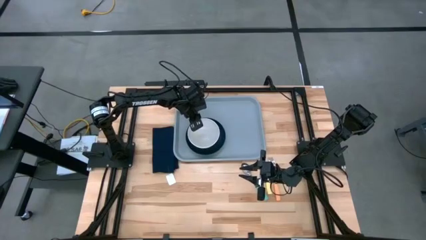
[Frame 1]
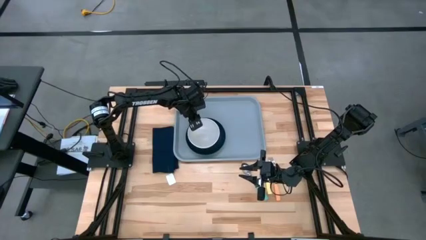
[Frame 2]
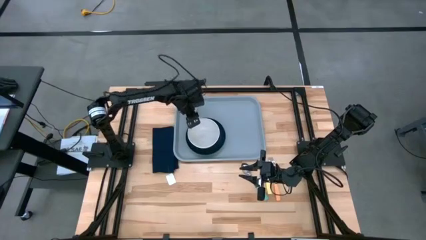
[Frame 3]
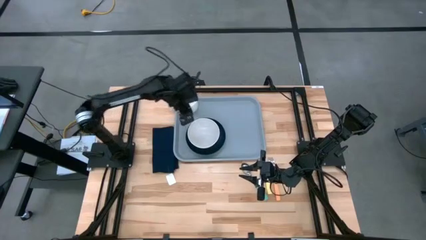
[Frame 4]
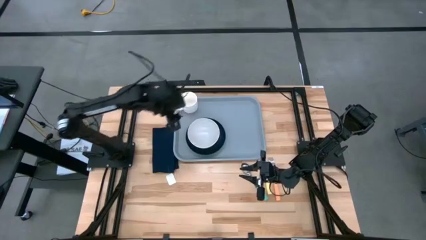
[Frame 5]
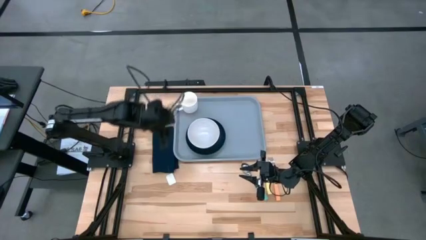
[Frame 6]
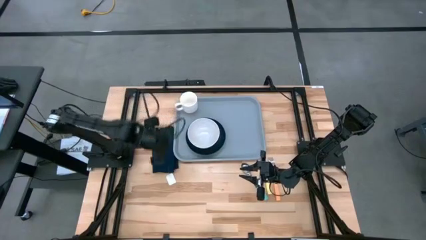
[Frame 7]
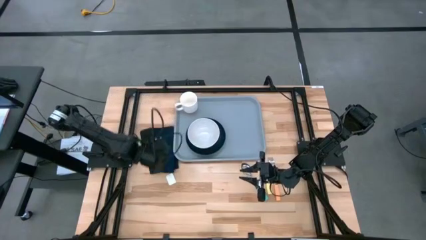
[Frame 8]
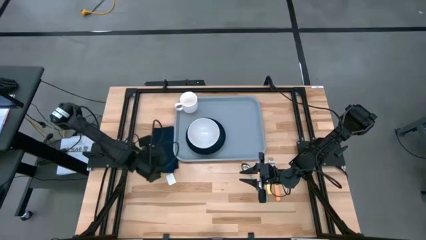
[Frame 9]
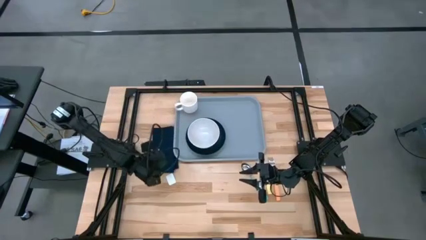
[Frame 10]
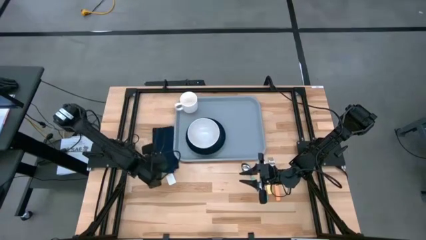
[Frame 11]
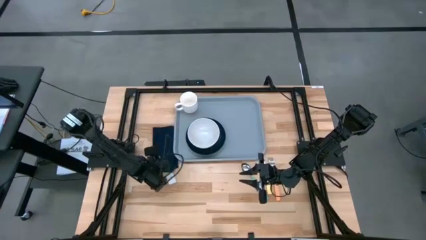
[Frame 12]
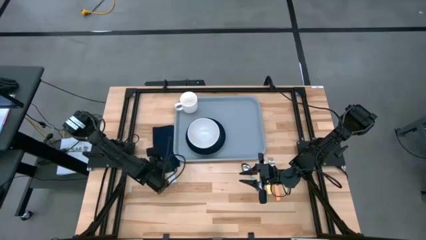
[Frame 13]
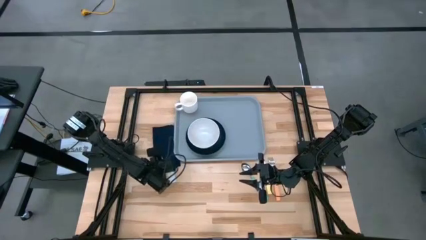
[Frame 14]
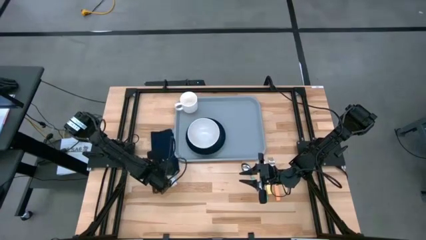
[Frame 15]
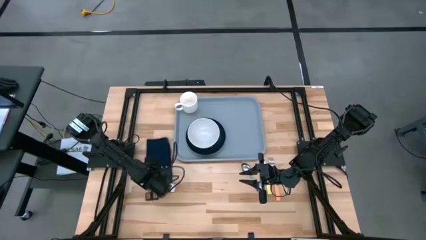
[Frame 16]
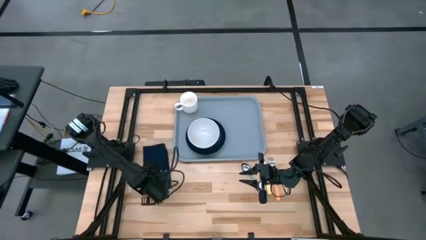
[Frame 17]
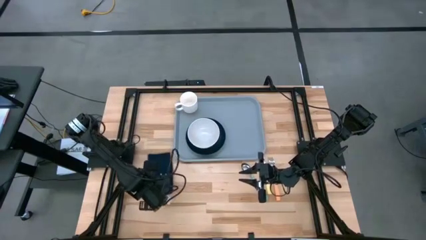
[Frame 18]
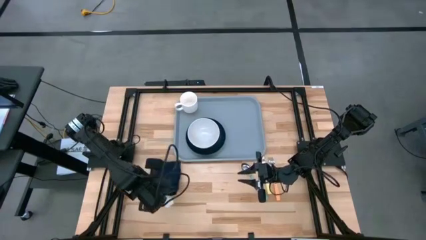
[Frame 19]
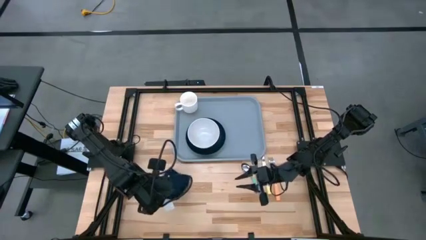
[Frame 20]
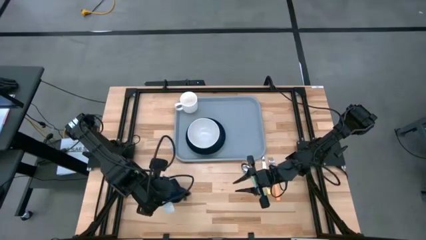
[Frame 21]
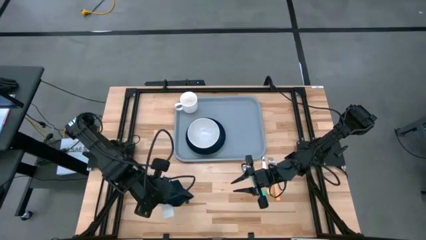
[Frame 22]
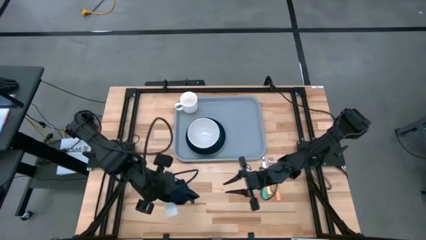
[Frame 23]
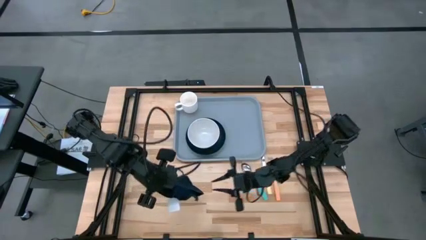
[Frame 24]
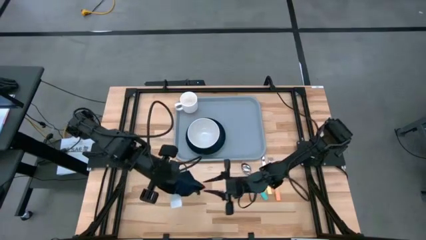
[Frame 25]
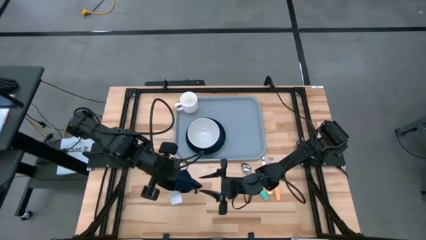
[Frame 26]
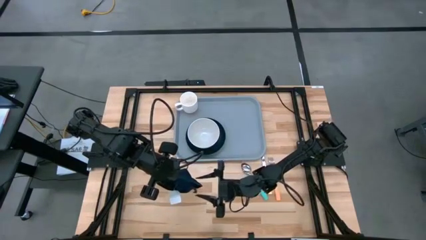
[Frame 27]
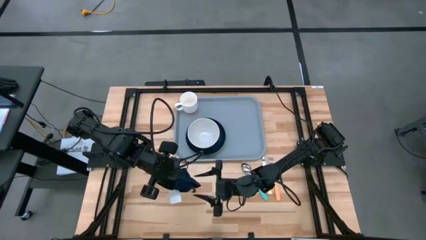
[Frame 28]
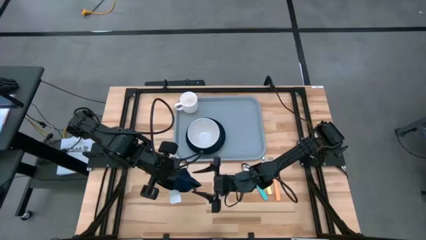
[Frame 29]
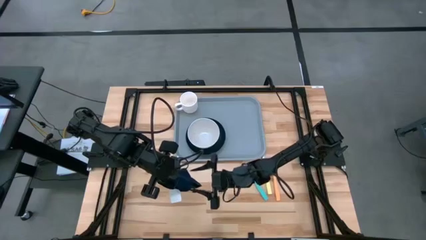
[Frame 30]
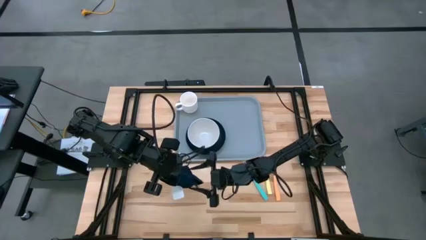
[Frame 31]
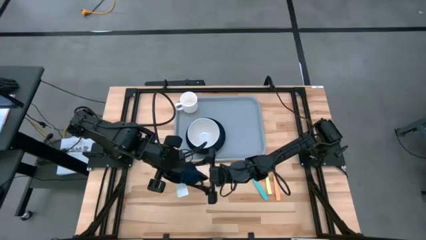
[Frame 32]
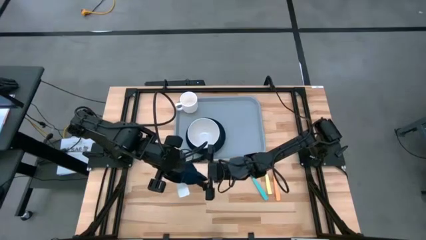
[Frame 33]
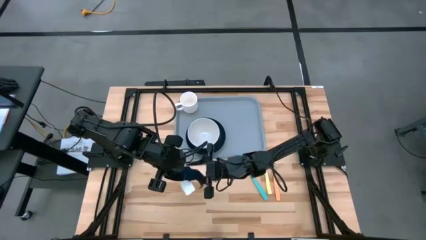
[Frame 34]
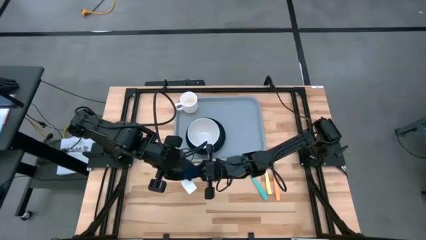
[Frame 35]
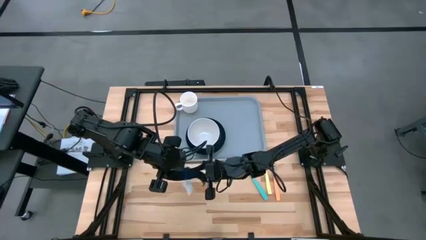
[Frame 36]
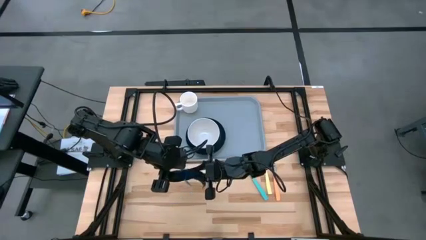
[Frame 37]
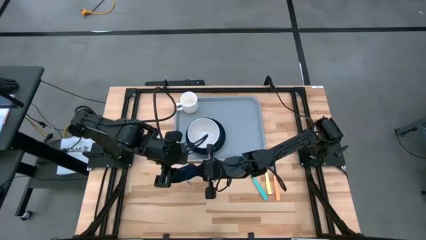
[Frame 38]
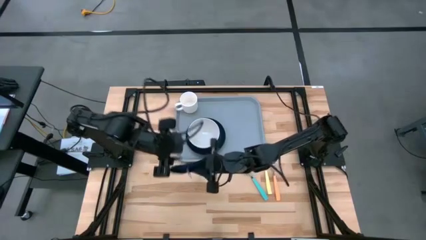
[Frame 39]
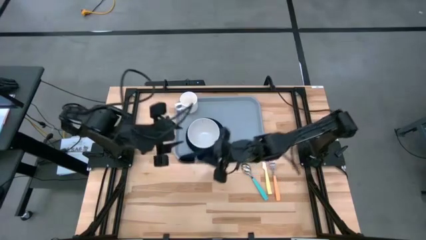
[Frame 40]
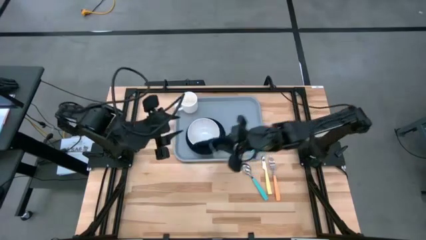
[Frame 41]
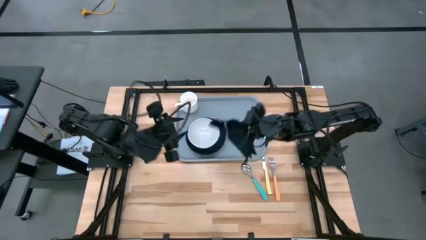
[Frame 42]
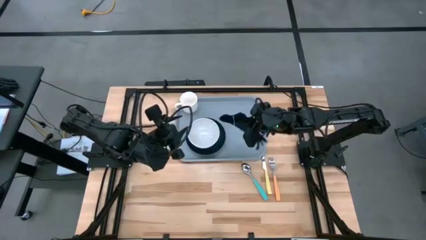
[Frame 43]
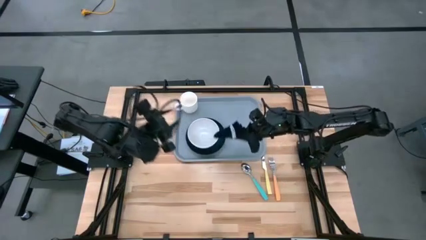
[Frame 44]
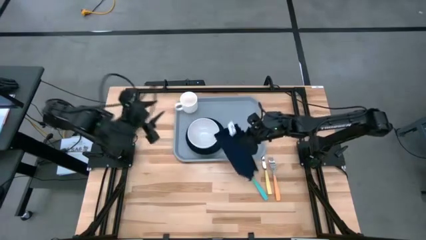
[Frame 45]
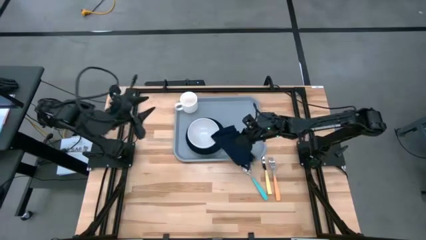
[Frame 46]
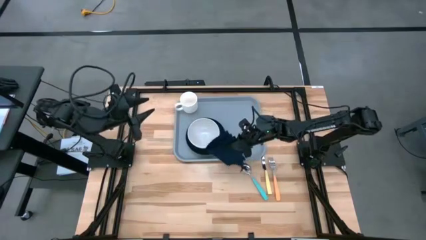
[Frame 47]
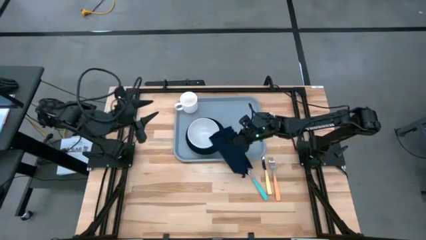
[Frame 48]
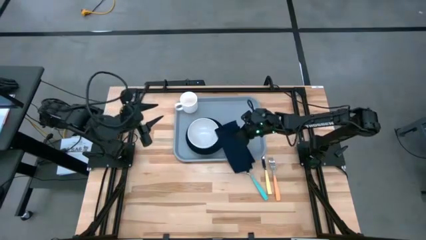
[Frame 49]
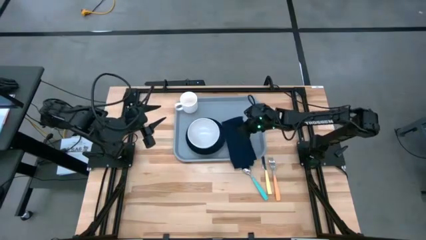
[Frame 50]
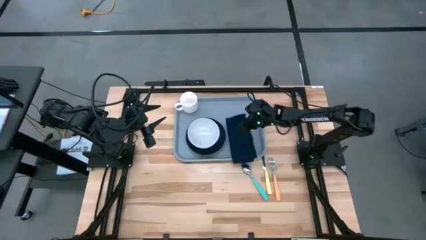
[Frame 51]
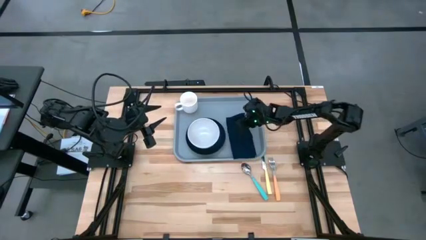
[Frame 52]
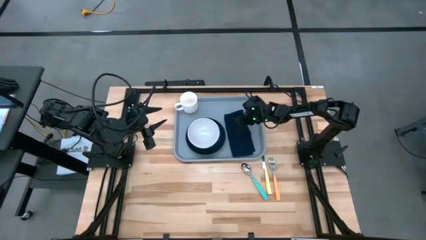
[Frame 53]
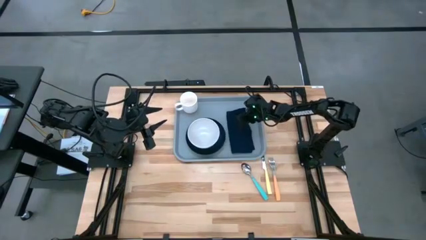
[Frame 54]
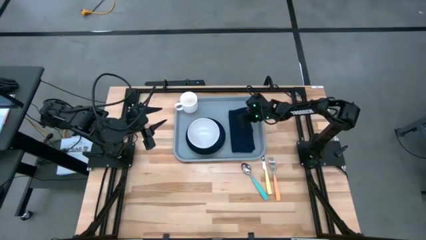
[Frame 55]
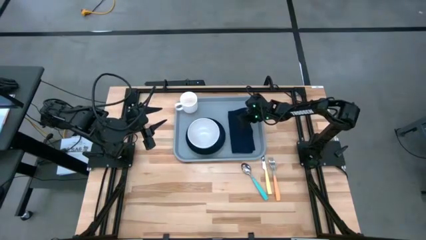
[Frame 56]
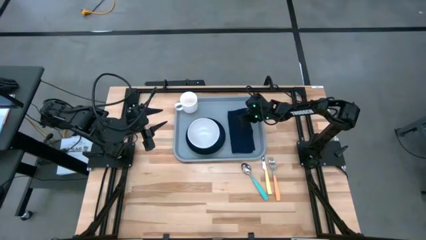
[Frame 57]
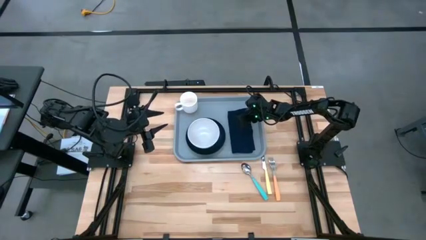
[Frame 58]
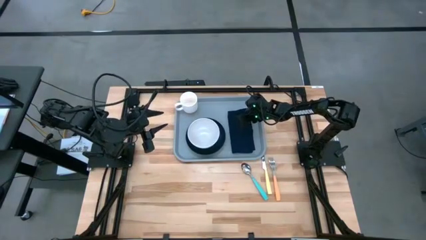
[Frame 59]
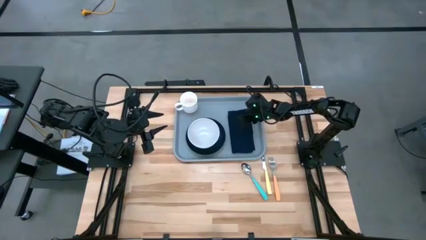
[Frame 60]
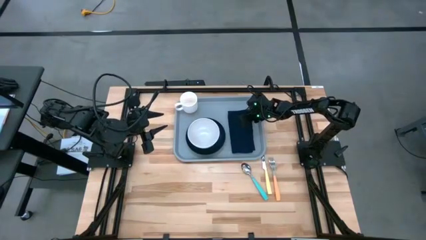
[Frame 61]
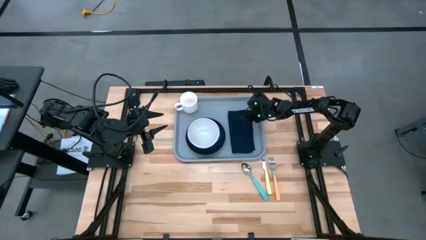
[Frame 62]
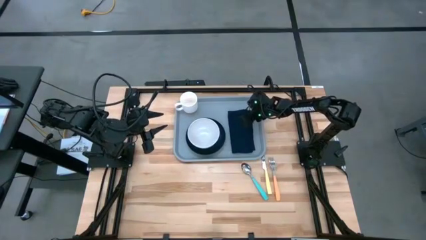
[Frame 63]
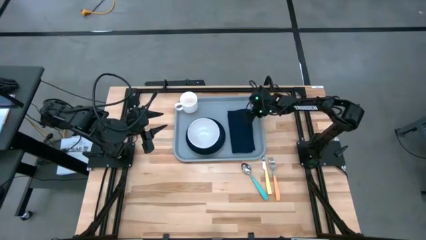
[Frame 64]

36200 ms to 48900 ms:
Task: Set up tray
Put the blue napkin on the gray serving tray to the right of the black plate

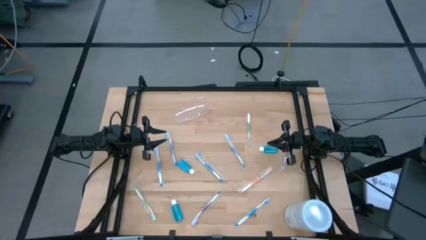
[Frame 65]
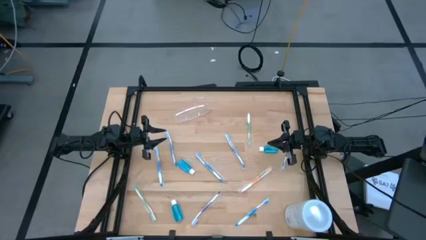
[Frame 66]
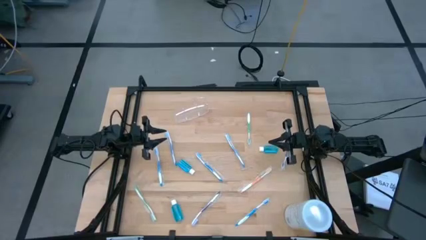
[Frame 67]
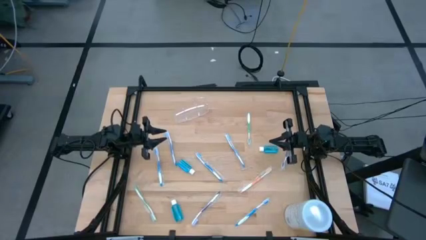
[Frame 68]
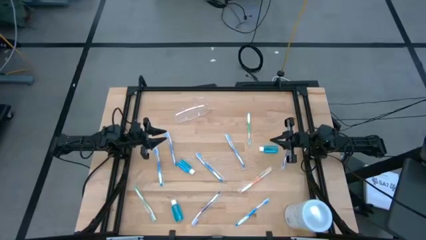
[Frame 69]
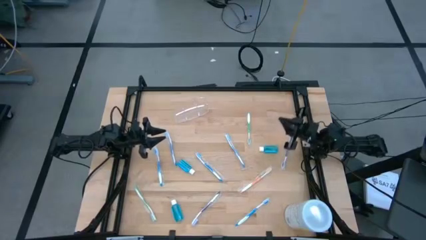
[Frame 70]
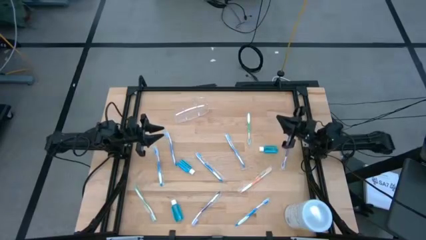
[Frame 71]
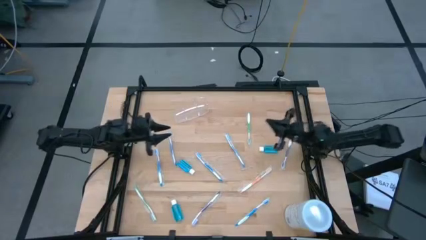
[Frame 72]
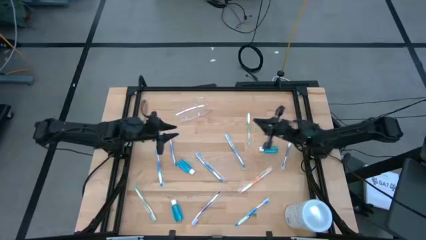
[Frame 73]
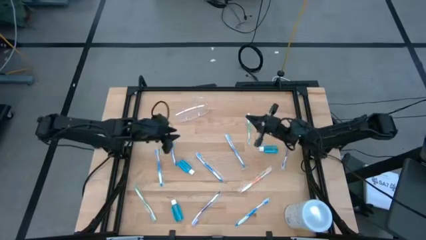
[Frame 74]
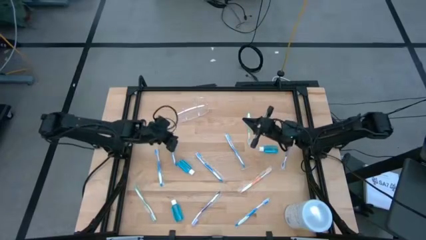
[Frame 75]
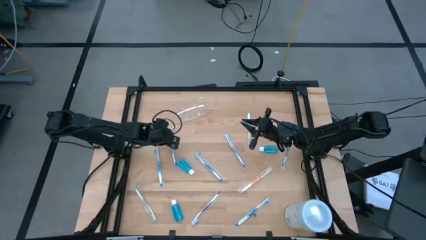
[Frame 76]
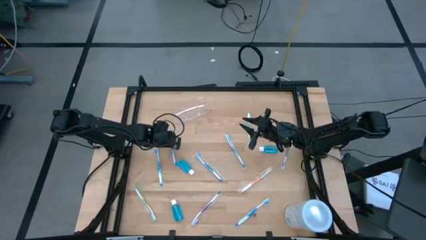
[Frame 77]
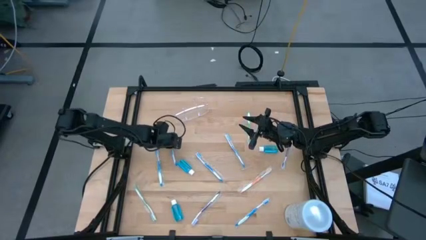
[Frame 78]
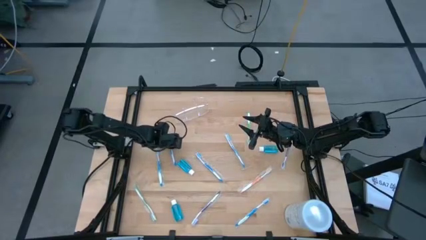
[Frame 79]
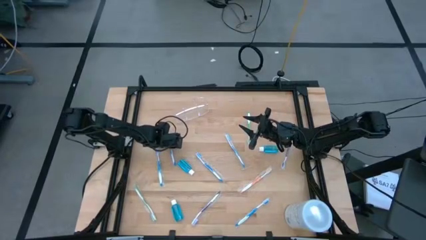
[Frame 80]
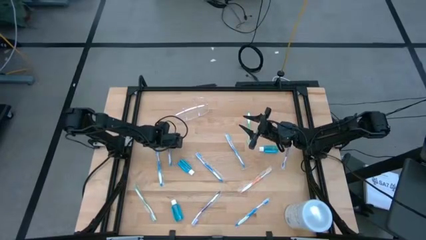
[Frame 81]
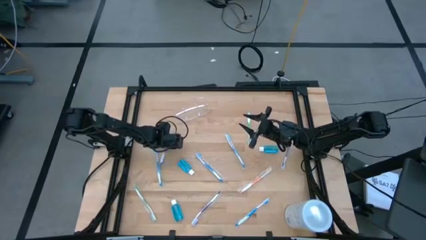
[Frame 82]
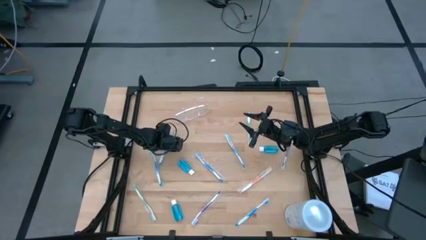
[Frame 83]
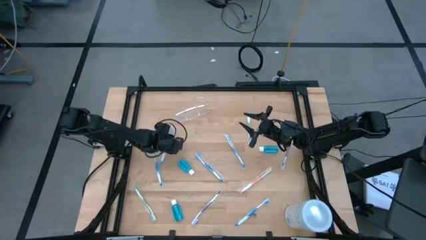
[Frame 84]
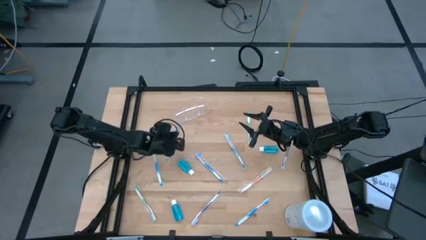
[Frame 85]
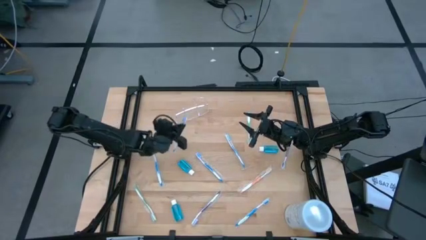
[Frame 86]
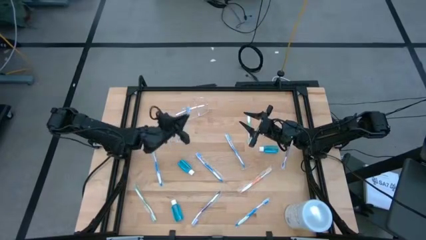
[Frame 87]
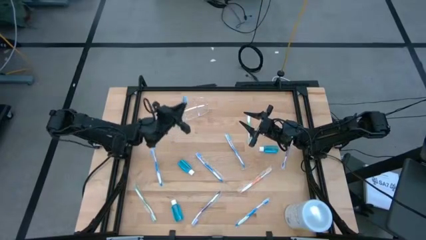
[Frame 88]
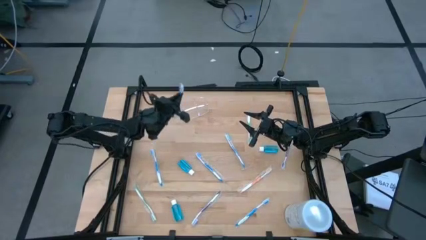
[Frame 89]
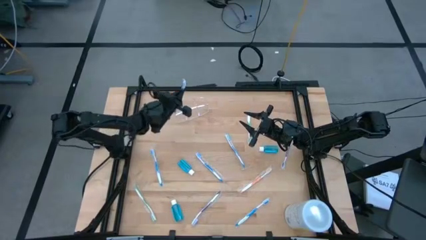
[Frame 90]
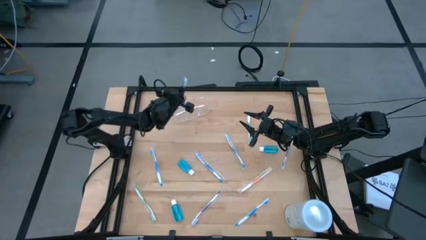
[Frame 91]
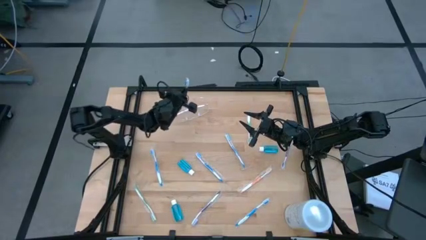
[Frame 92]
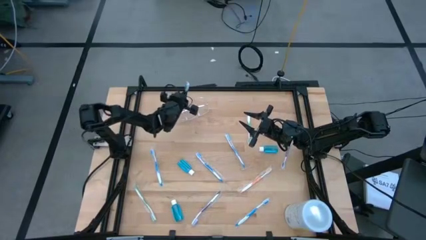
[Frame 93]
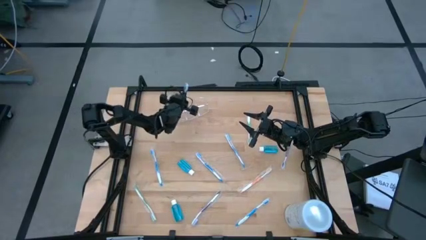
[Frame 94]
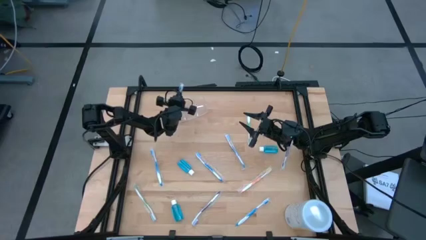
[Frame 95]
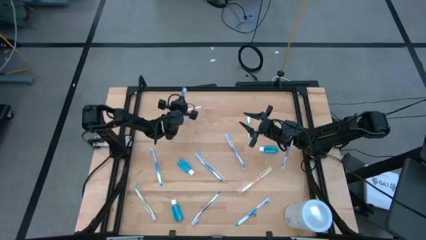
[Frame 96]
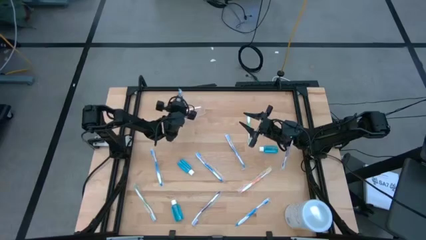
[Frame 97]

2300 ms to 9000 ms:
Task: Pick & Place toothbrushing station
Put the blue toothbrush into the transparent organizer
